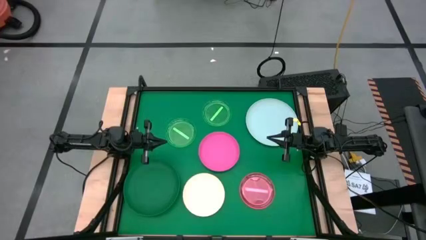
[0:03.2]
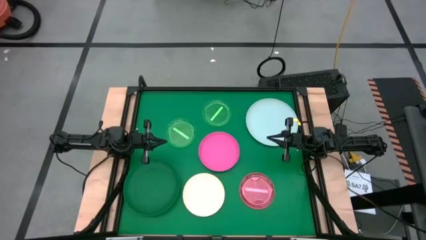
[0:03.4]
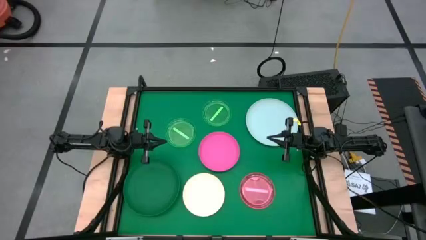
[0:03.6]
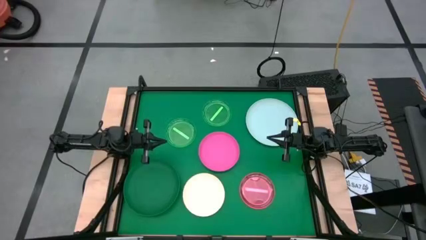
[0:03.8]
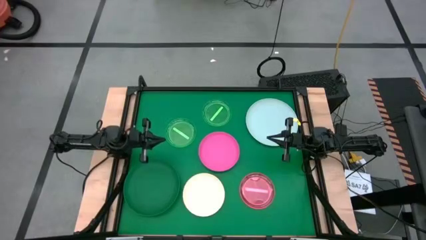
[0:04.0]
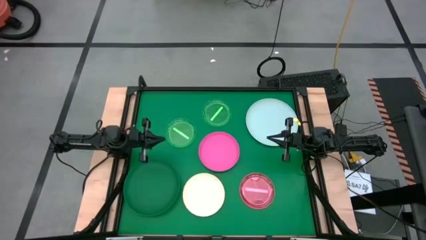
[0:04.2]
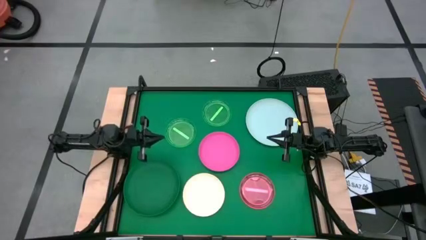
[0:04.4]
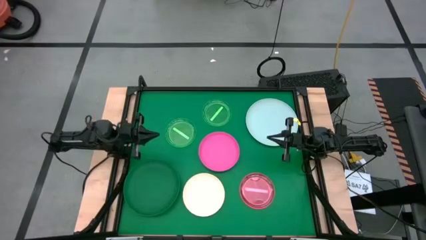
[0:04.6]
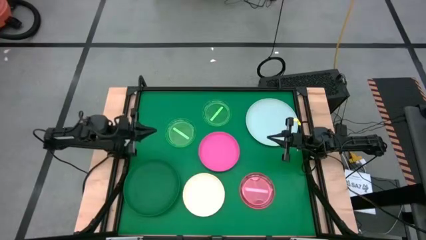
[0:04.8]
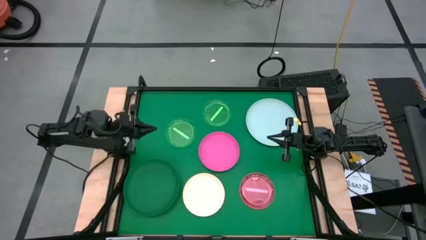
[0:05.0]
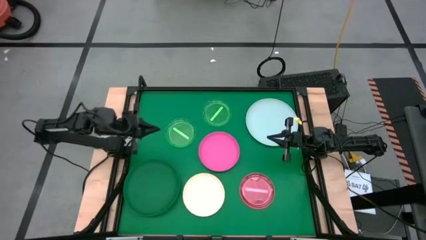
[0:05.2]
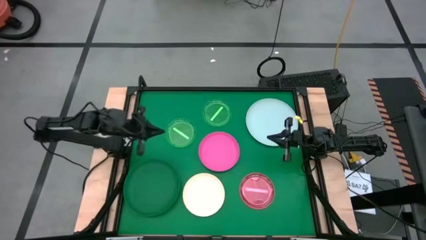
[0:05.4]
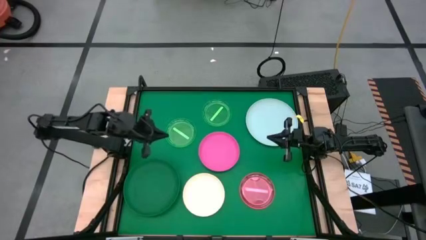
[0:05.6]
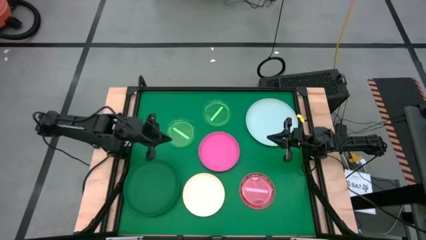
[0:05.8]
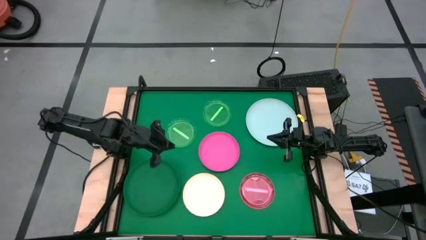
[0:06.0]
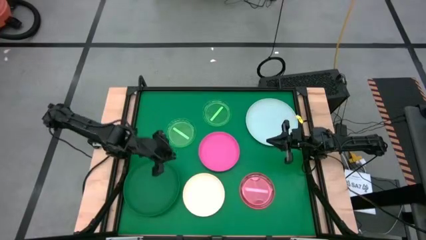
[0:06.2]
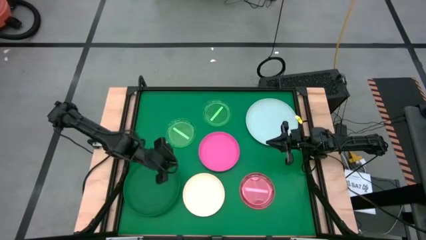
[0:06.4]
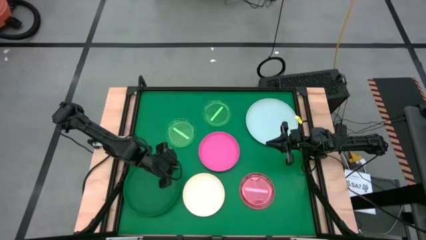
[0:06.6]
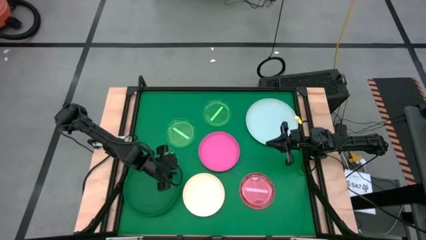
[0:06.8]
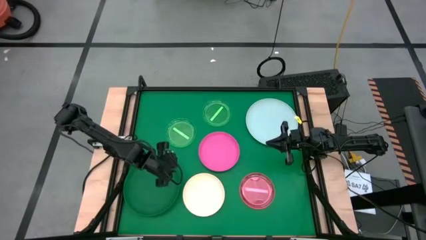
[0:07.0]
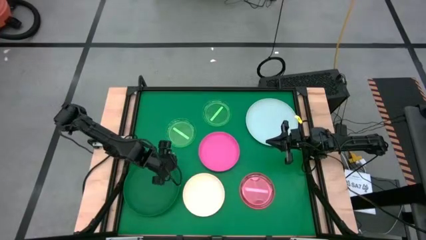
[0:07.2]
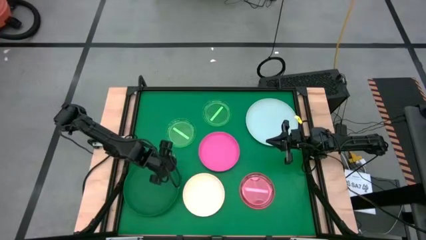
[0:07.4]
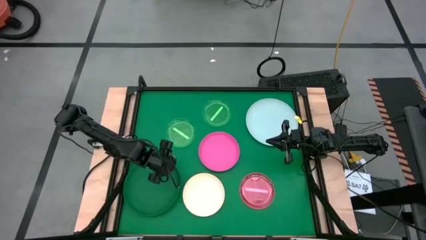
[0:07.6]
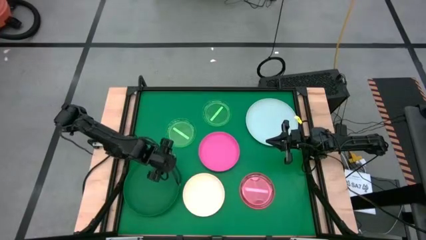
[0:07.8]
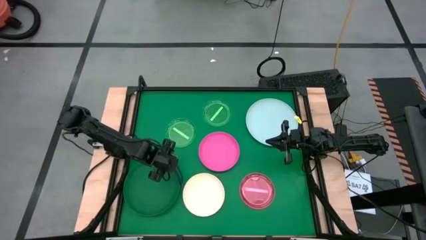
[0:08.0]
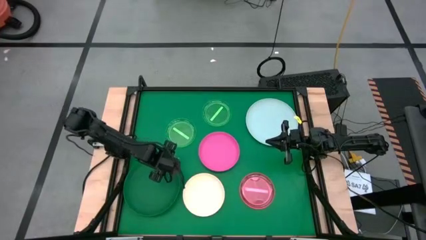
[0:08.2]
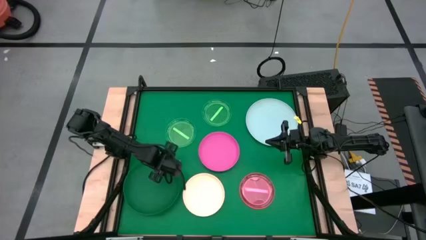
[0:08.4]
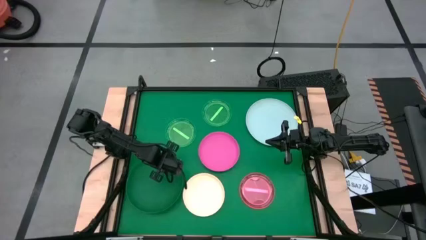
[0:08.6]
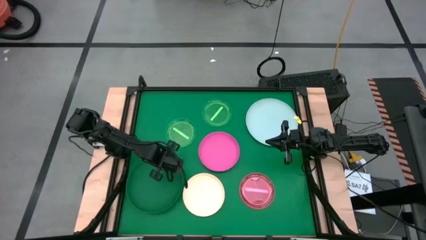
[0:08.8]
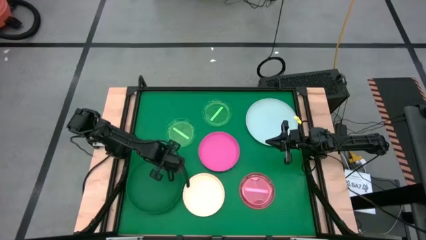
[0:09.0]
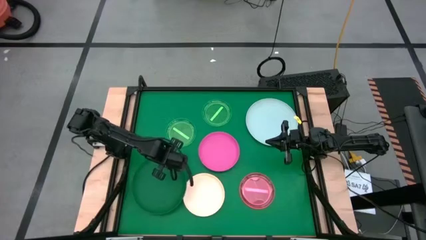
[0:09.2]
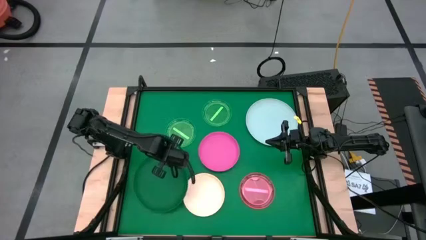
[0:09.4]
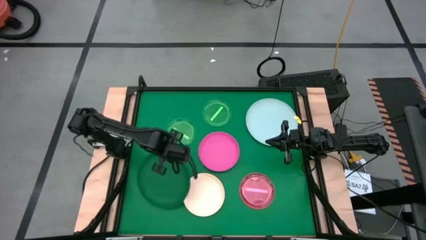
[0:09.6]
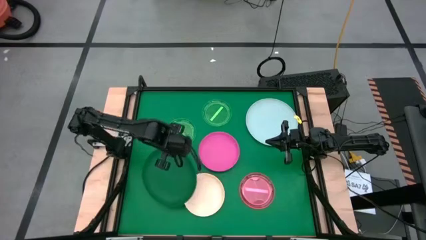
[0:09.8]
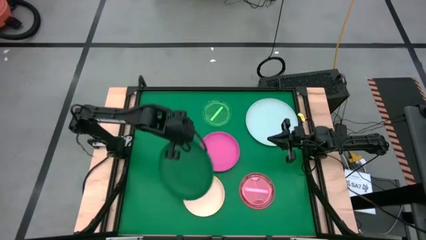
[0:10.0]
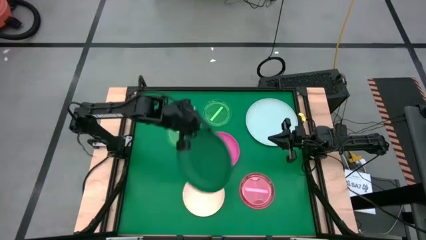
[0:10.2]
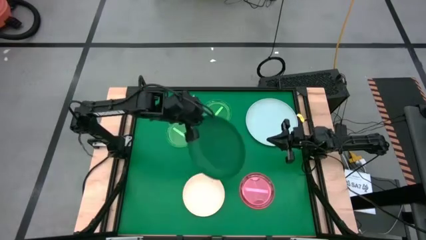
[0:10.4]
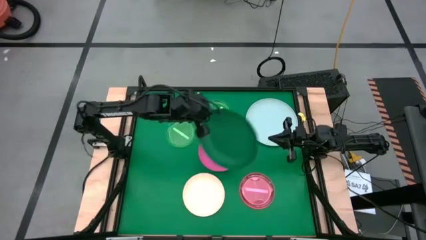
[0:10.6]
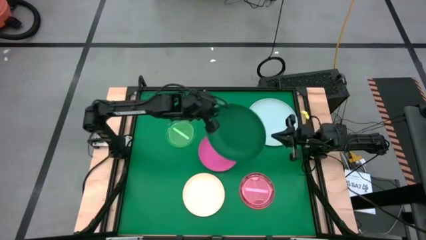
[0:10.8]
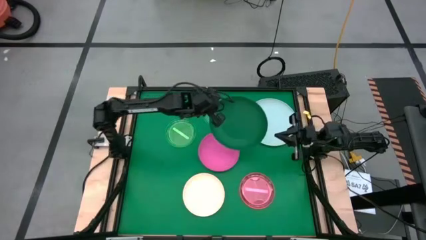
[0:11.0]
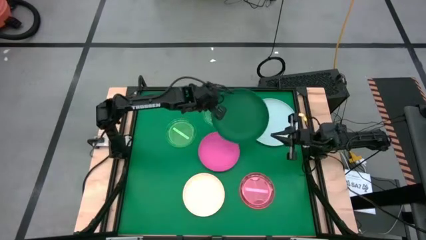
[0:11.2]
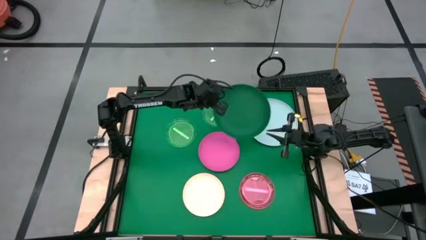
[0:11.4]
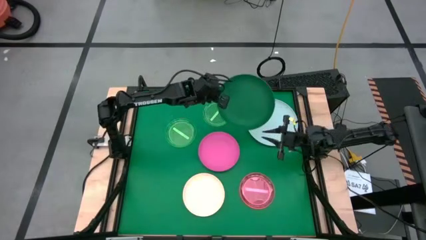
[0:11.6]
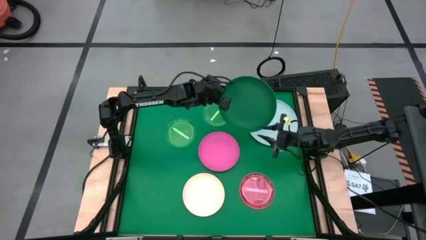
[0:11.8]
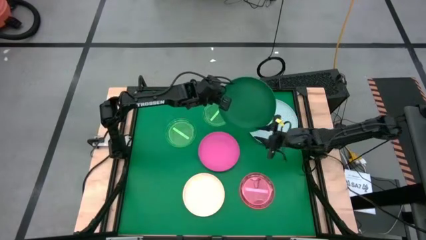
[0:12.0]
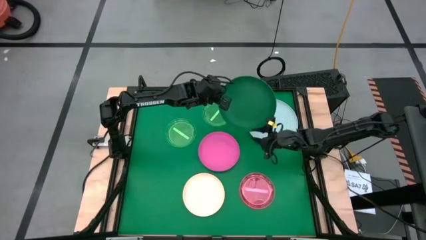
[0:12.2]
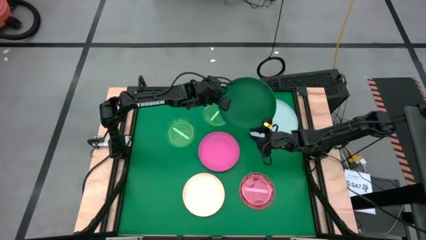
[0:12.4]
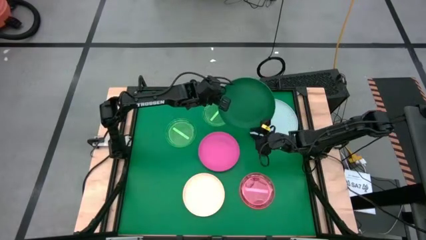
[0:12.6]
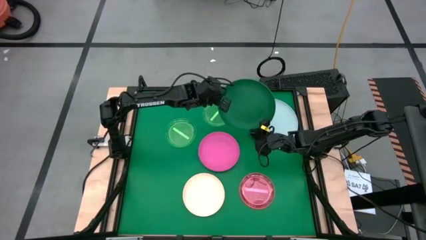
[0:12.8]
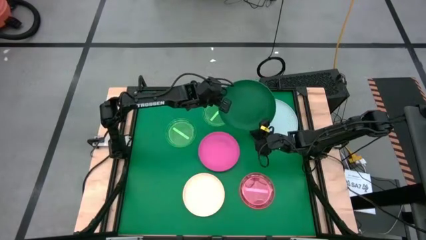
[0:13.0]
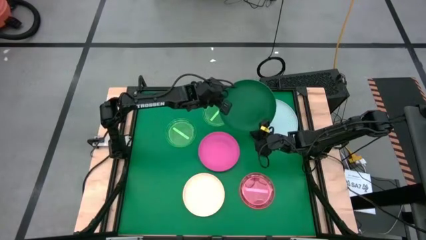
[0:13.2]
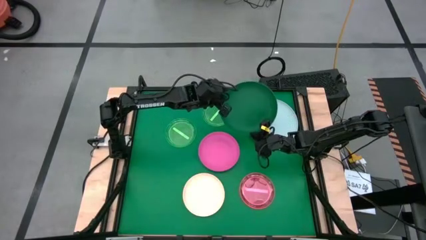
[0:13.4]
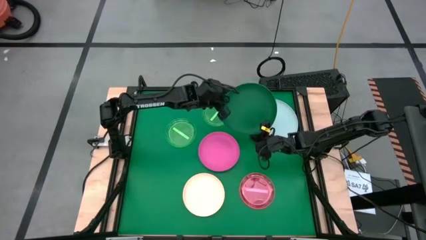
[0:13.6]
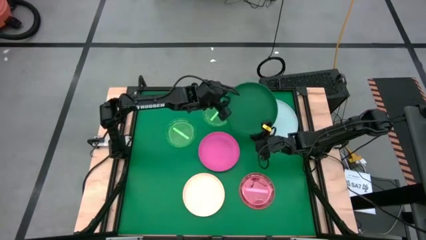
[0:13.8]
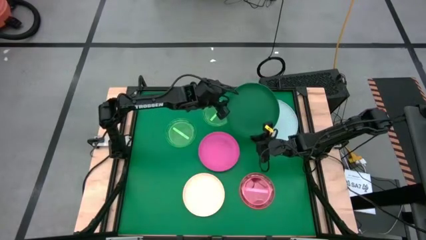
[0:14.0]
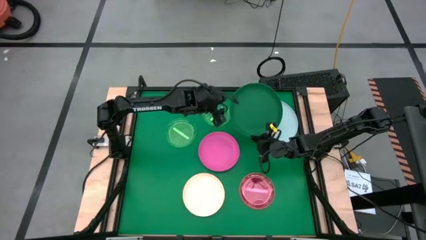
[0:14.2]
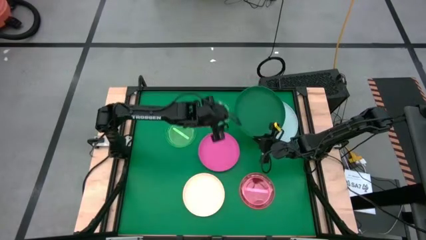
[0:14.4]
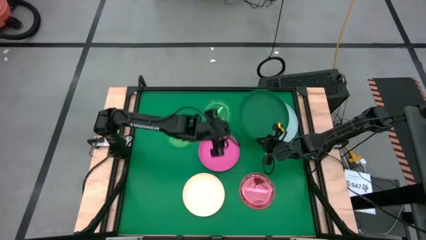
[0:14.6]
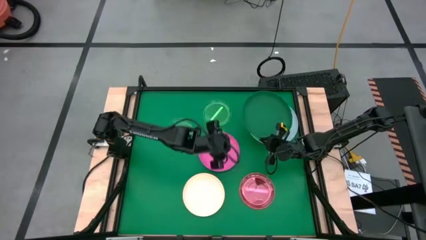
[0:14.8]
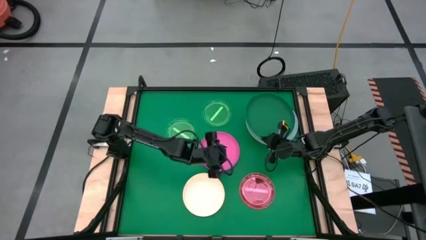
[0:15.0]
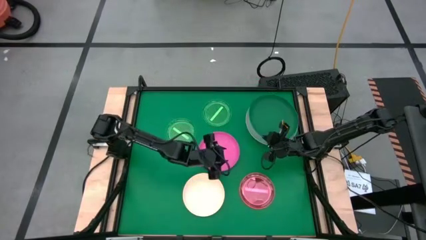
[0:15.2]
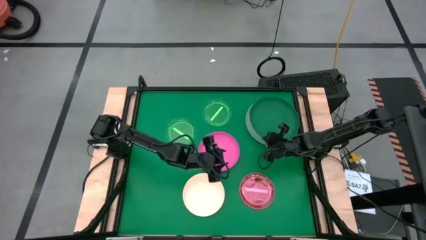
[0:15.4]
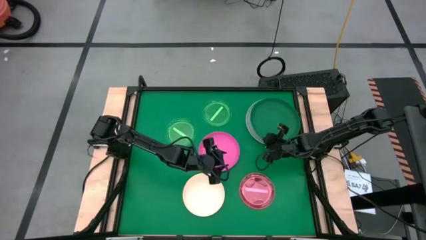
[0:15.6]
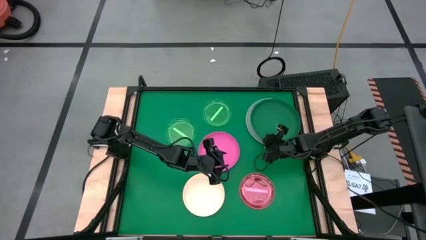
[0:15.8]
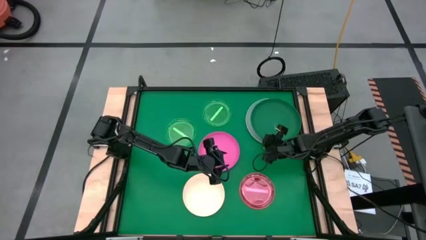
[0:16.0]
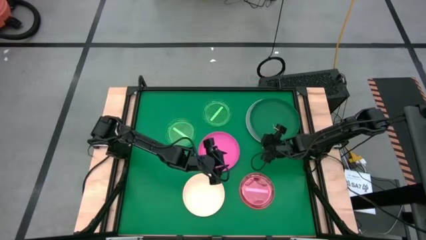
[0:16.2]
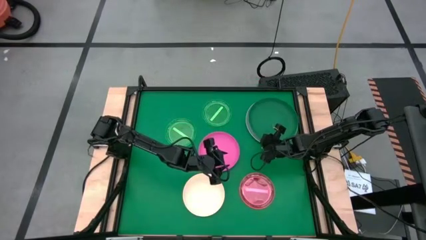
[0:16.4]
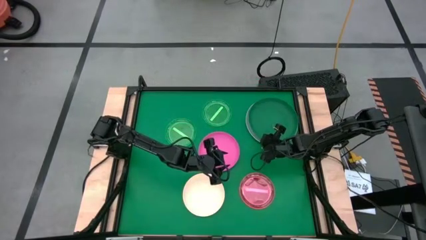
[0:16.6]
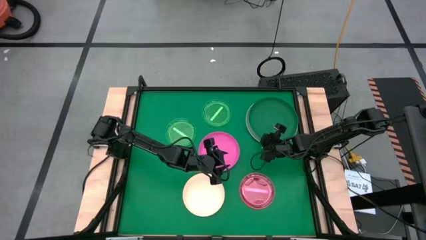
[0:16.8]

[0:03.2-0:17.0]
Task: Stack plastic plates
Stack the green plate on top of the light blue plate
